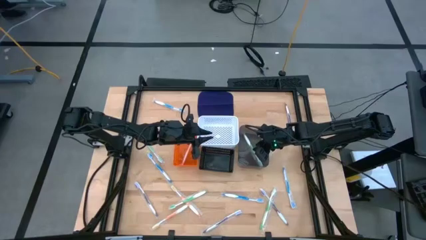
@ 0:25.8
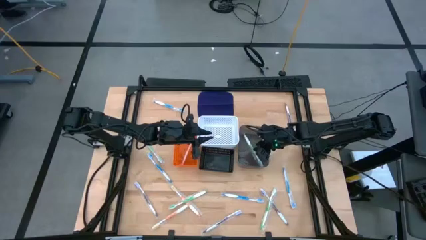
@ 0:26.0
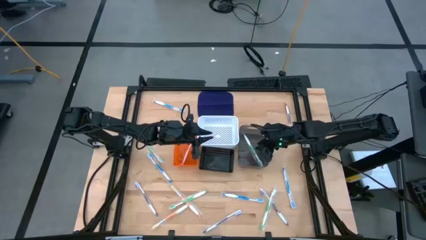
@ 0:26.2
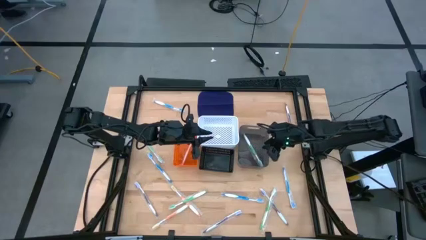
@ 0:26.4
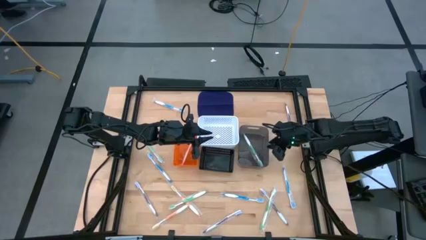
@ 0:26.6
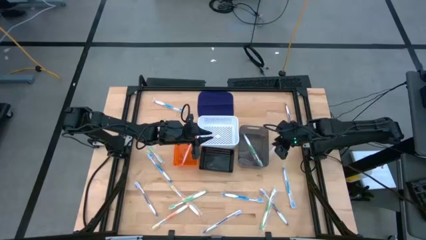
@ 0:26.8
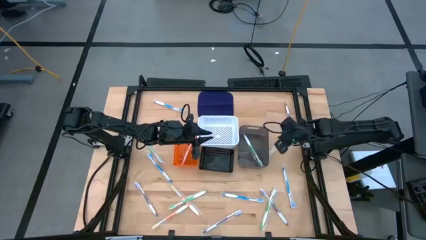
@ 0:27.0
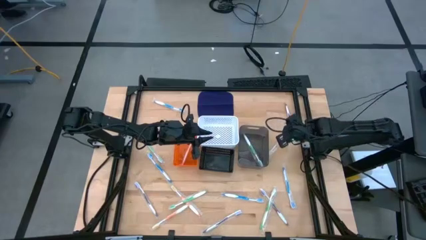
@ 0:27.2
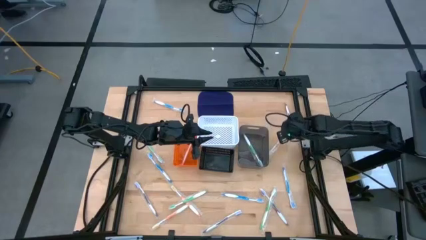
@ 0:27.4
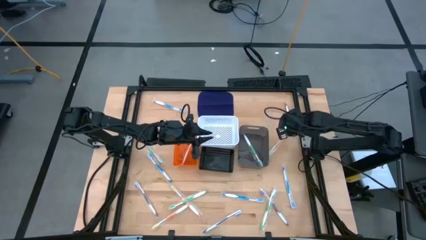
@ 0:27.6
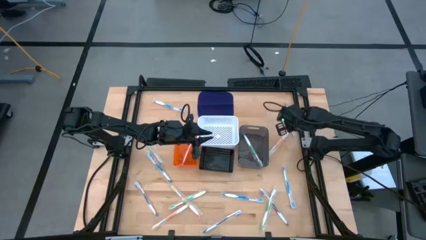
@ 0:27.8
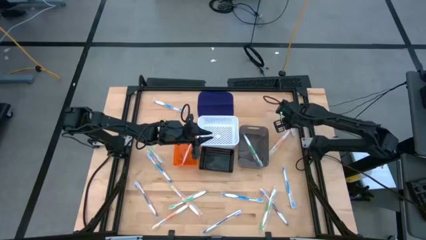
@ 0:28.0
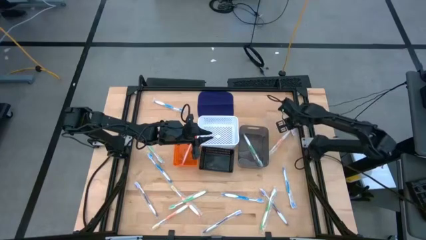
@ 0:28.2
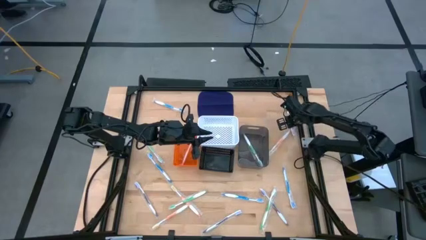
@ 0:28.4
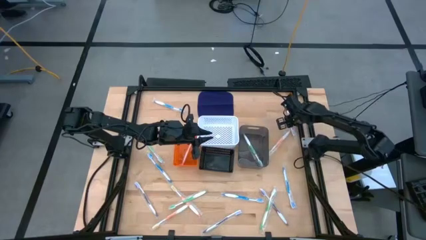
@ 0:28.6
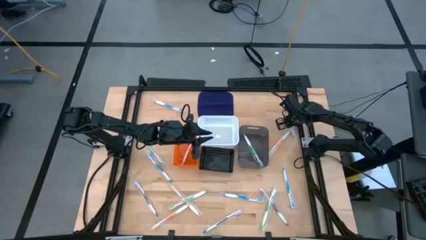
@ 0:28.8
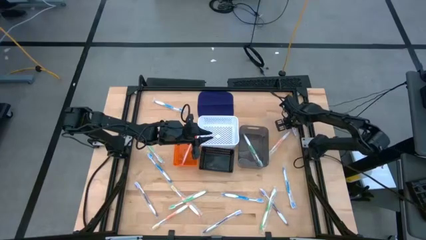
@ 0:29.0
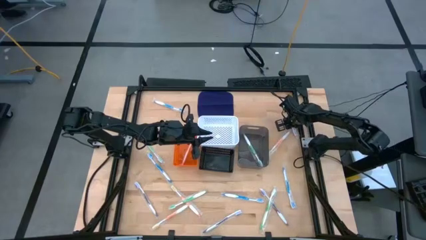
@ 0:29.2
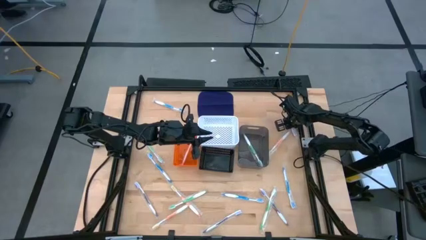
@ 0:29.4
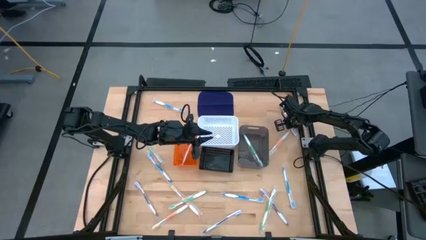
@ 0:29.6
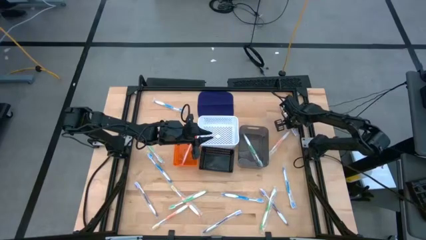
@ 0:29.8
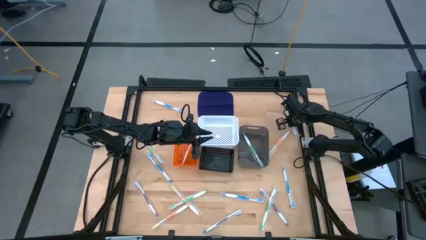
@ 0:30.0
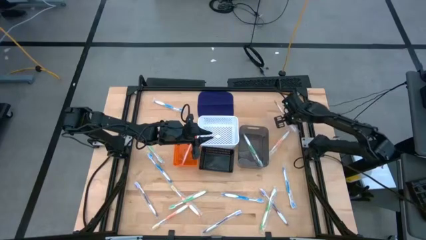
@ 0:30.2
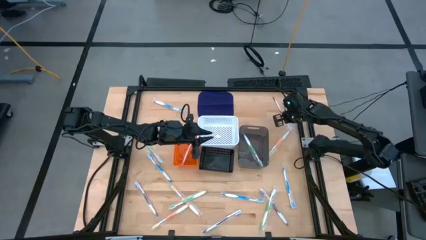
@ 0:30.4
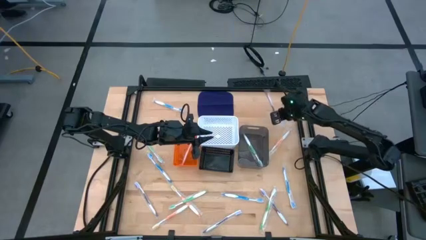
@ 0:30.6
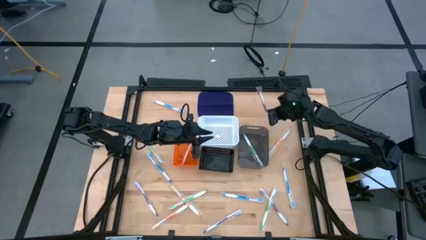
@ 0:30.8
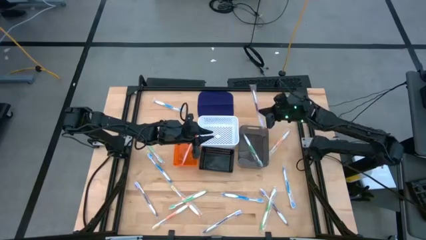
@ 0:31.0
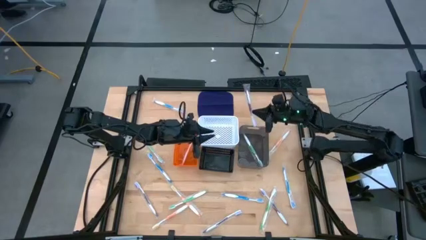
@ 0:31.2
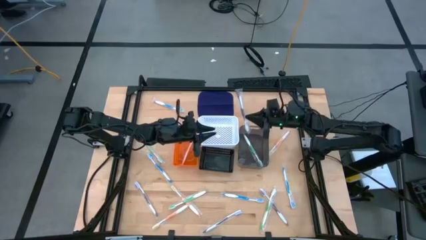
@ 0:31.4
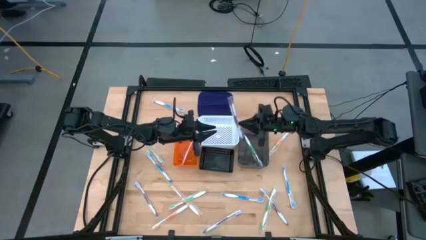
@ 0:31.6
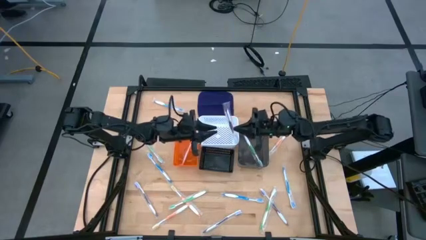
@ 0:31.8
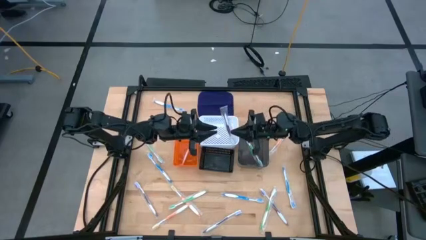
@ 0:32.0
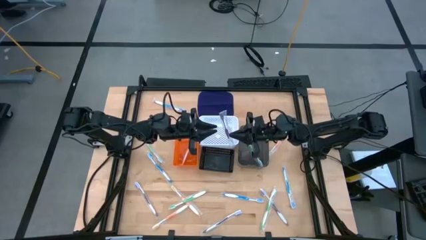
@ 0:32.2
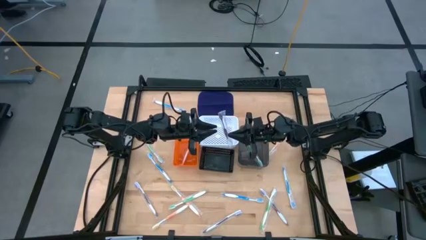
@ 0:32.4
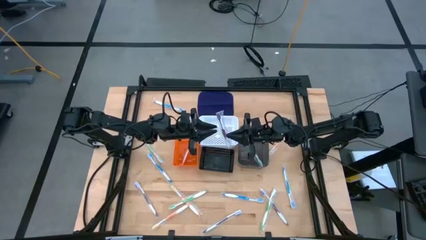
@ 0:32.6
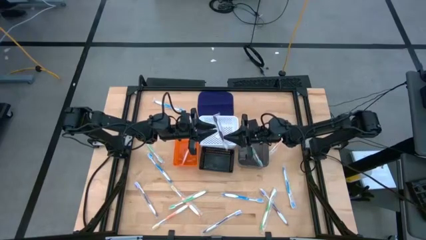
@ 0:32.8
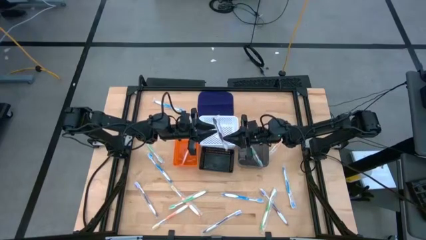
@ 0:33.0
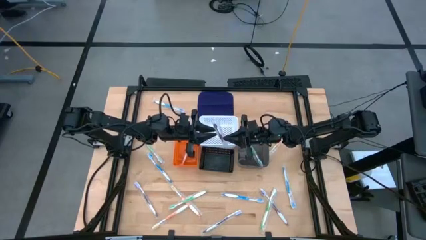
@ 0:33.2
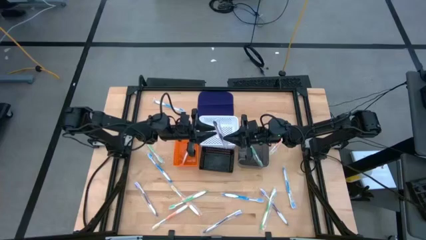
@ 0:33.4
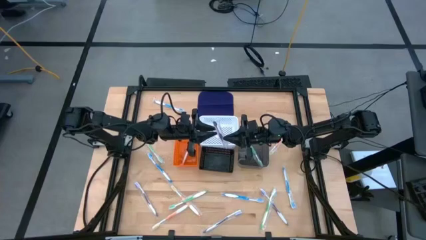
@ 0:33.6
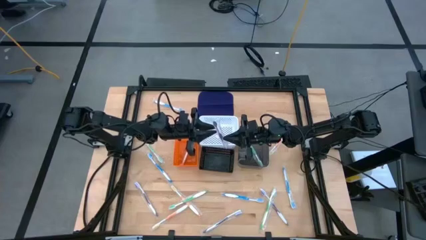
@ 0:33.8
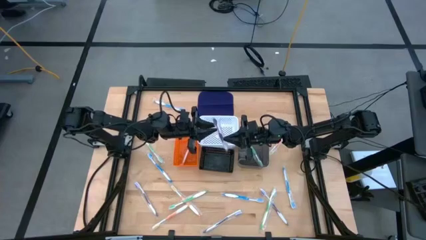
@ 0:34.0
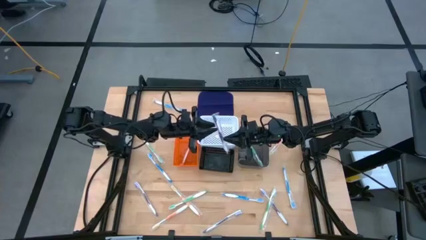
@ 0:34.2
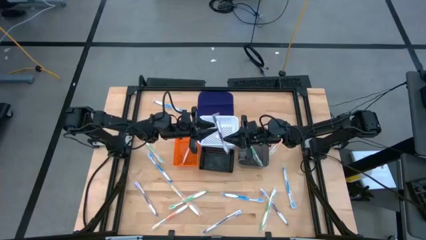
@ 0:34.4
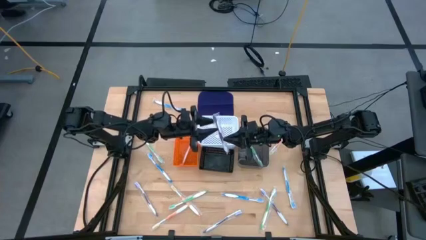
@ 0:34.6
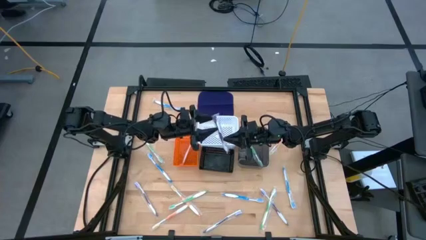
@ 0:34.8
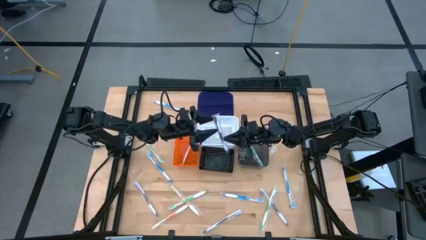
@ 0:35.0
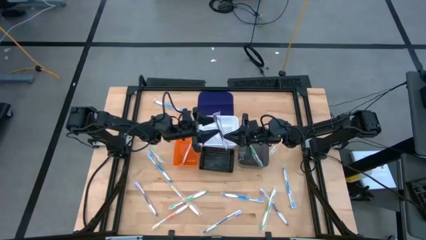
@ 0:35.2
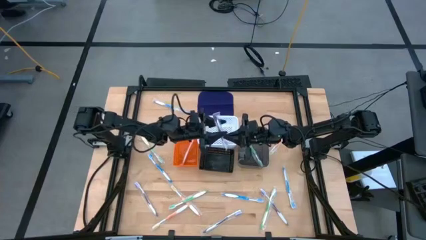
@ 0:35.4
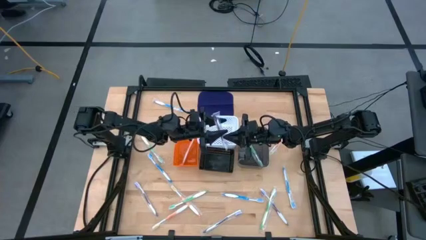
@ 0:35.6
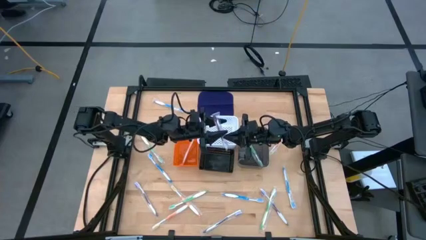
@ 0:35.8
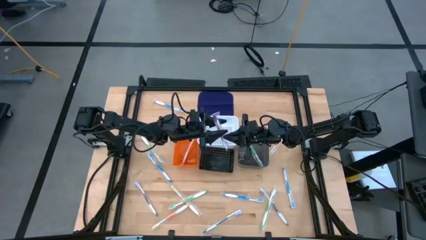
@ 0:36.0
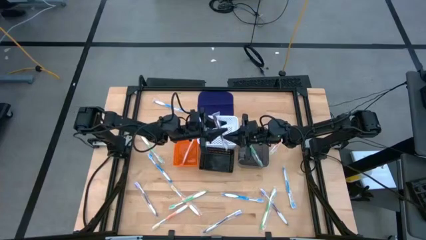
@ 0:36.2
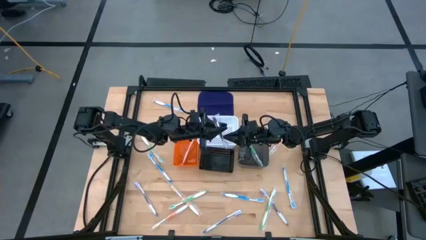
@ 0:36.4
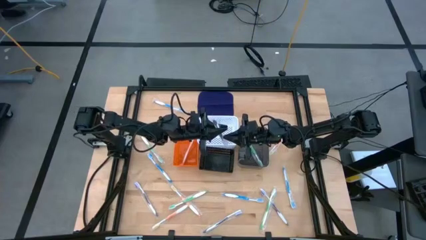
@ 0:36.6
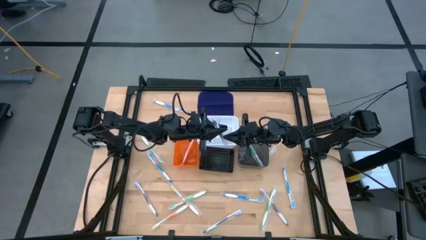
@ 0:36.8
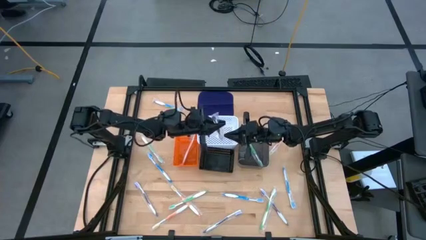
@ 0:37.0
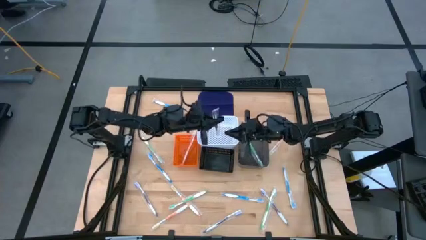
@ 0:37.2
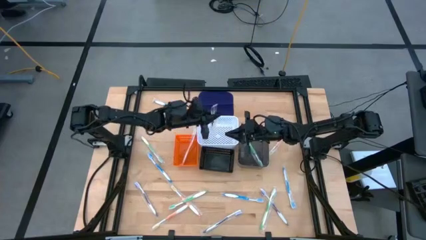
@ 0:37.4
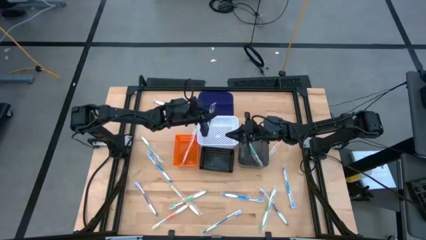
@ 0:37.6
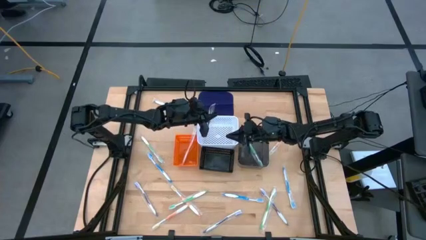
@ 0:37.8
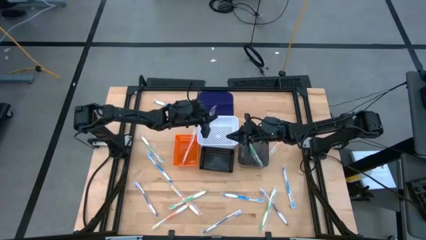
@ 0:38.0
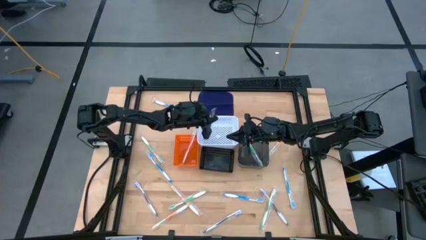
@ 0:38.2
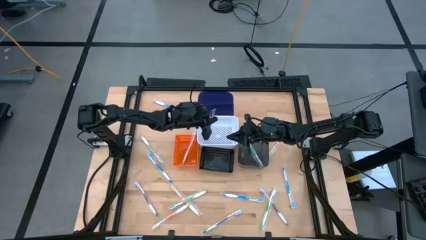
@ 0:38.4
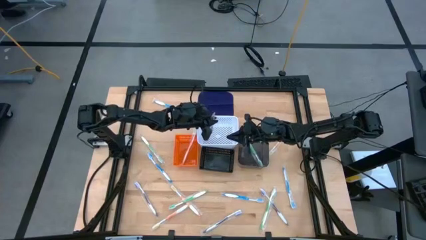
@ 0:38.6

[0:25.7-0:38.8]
Task: Pick & Place Toothbrushes
Put the purple toothbrush into the white basket

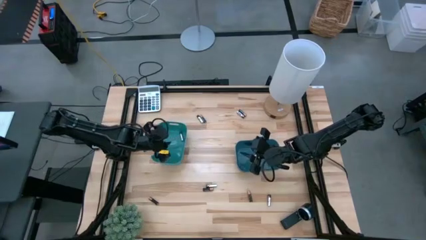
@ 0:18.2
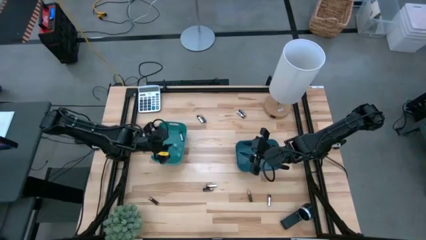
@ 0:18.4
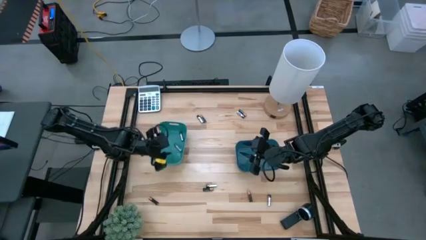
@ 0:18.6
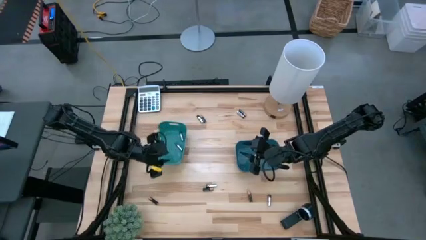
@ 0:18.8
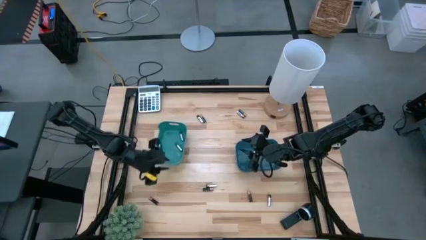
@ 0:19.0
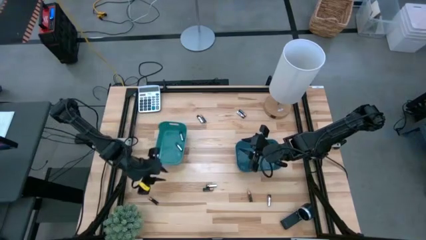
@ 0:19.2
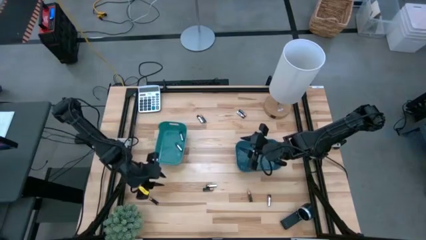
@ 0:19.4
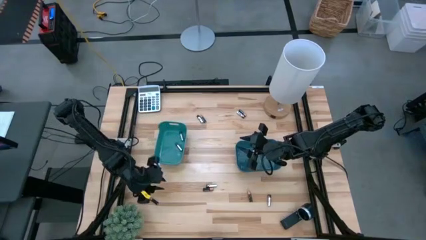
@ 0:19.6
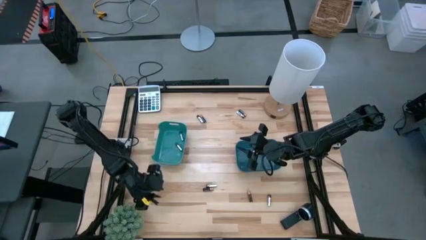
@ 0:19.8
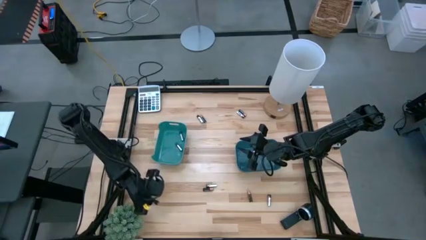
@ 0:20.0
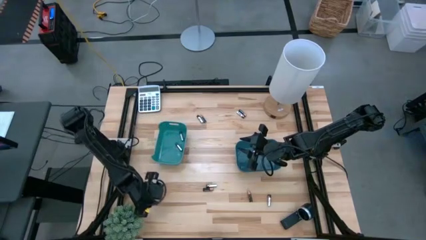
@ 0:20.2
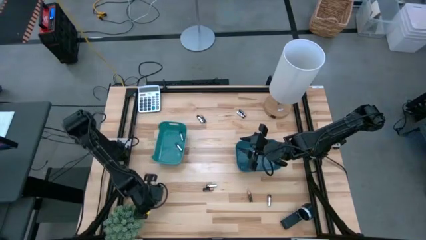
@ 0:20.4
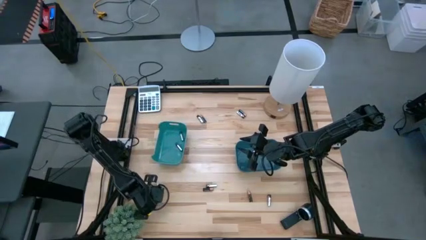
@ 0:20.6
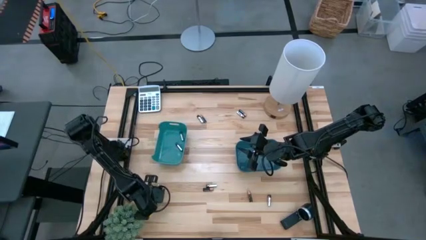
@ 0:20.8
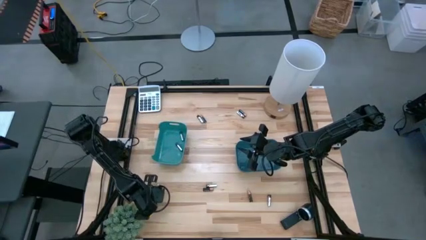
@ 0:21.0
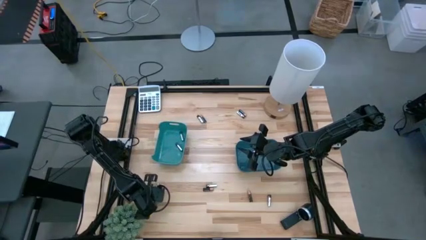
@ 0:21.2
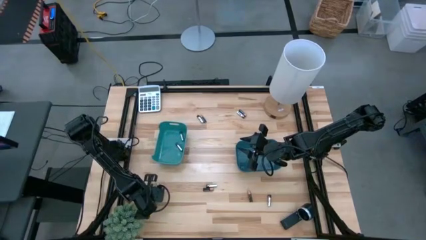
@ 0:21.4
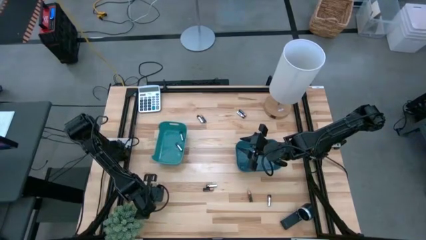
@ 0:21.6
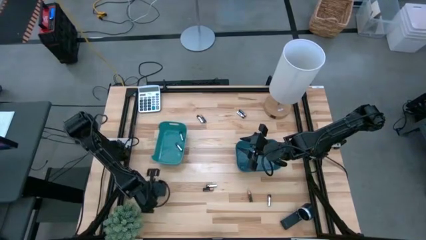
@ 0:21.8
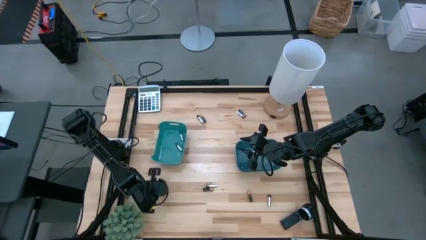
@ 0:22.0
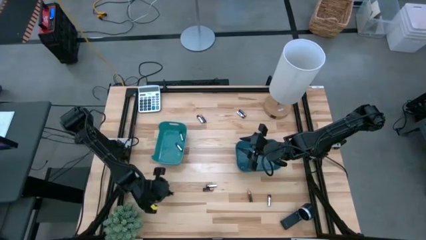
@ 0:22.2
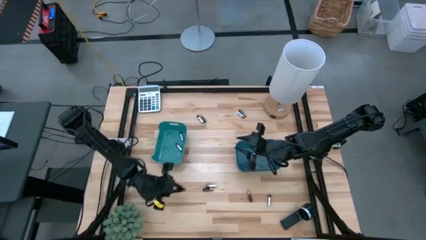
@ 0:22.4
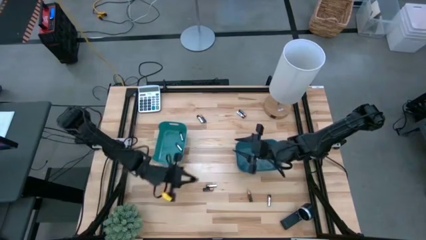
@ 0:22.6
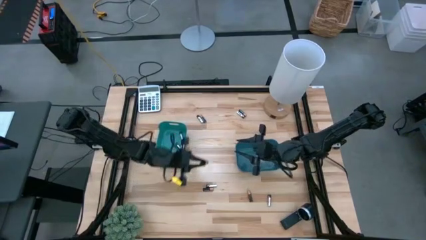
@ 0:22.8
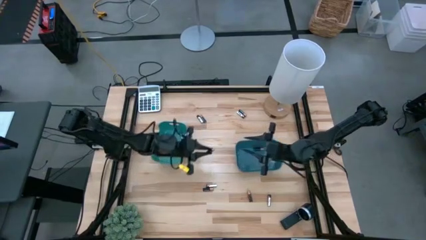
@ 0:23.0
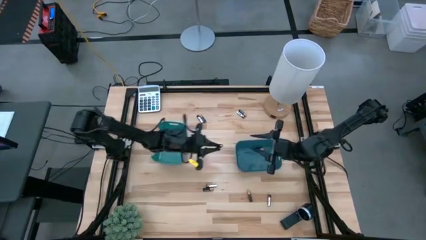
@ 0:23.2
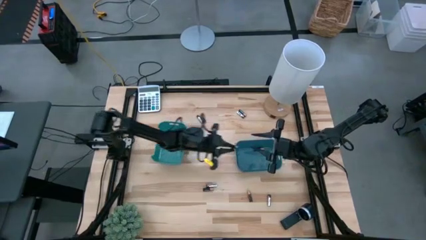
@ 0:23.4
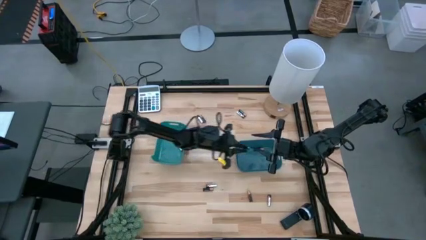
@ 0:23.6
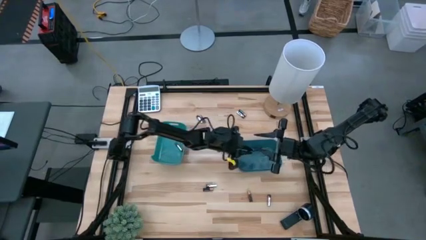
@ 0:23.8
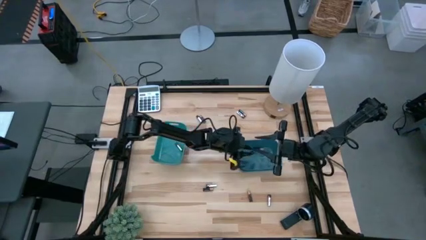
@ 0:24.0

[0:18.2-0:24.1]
Task: Sort batteries
Put the black battery into the dark blue bin
